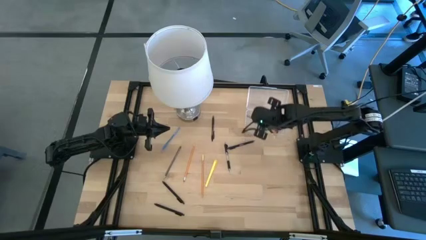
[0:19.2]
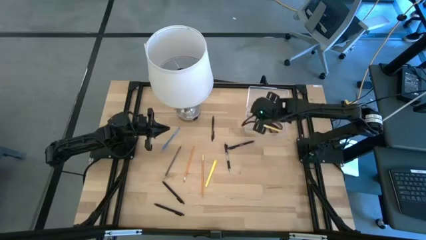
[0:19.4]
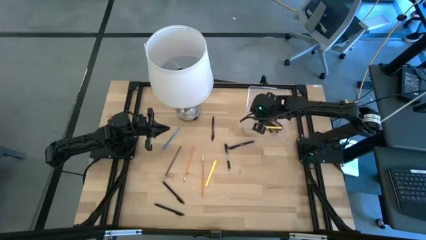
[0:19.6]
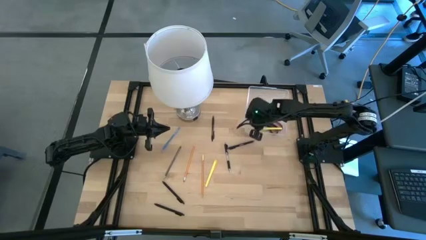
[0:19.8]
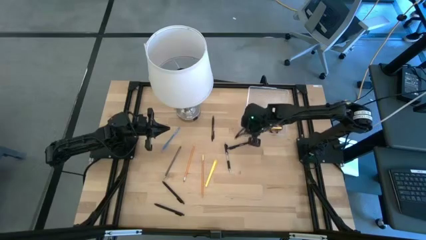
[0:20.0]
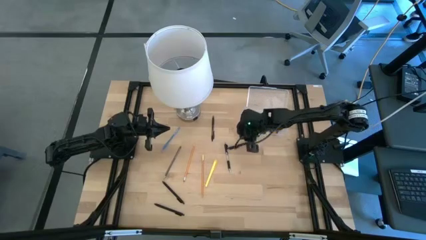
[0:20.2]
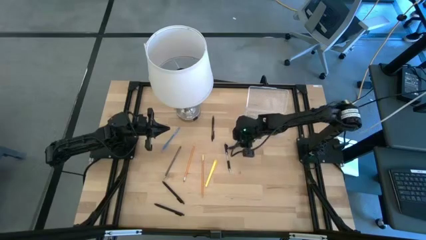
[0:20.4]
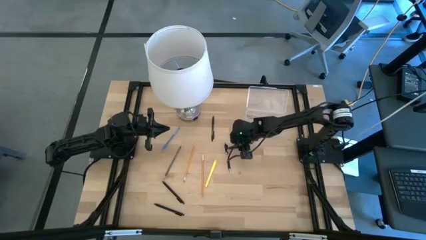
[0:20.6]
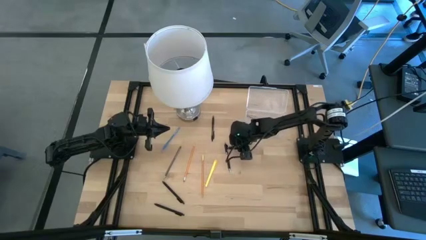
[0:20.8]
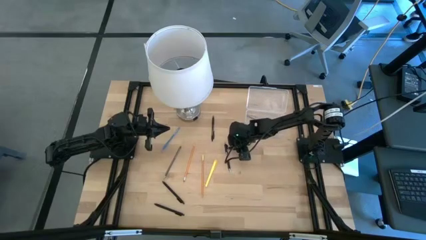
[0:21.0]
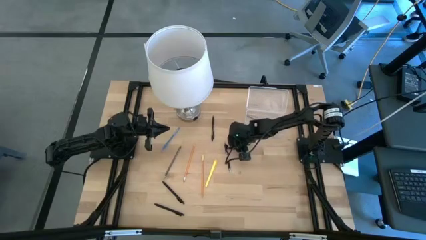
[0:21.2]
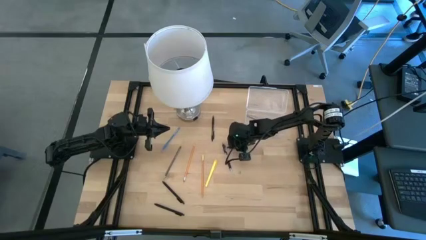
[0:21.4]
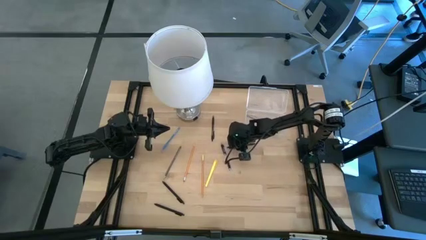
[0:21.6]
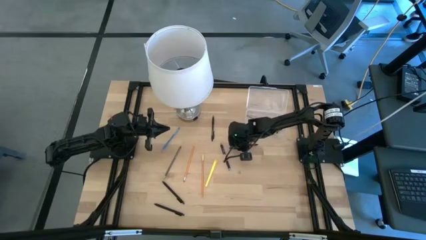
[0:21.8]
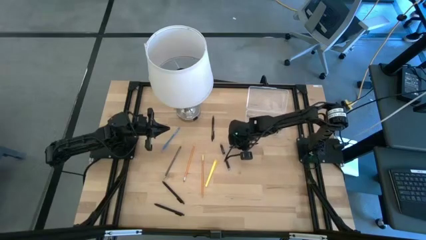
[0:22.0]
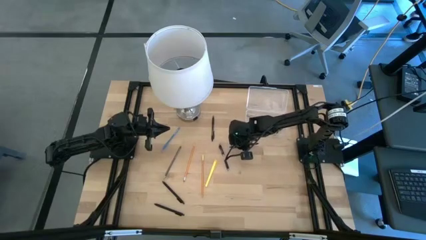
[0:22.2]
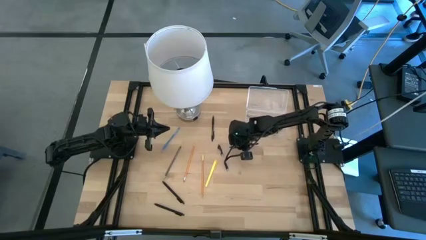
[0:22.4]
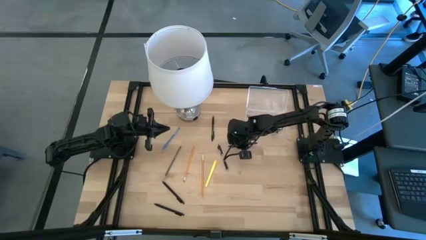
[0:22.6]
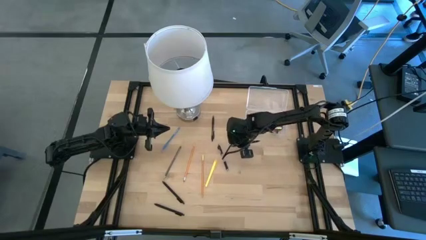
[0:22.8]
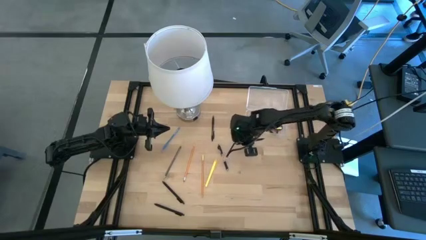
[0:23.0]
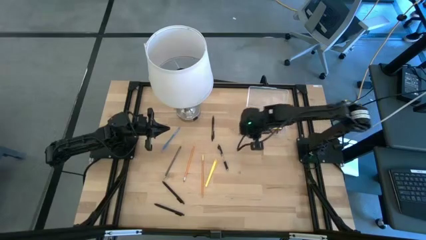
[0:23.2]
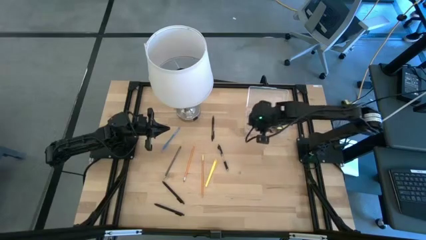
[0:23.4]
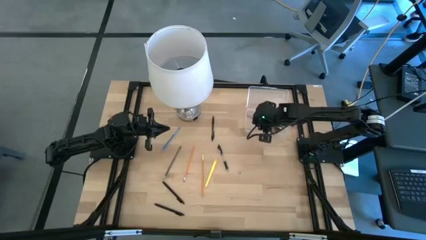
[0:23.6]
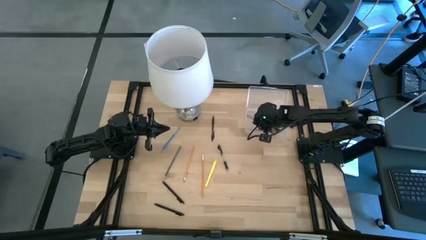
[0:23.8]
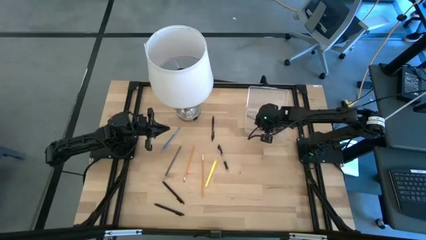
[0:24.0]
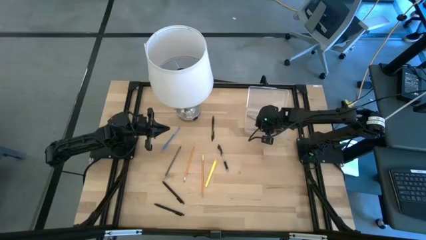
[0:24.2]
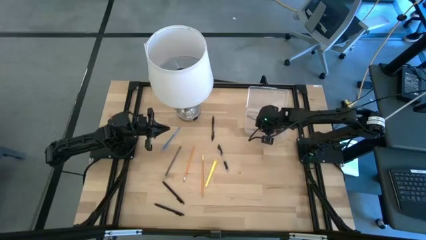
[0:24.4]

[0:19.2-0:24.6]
Task: Pick & place school supplies into a supply box
Put the black pen into the transparent supply box

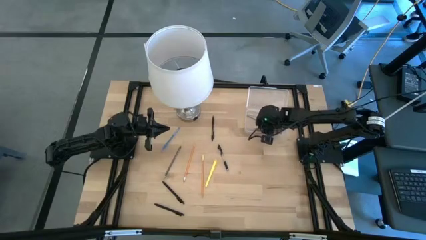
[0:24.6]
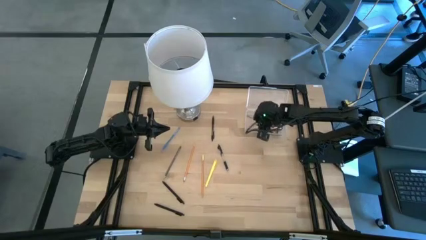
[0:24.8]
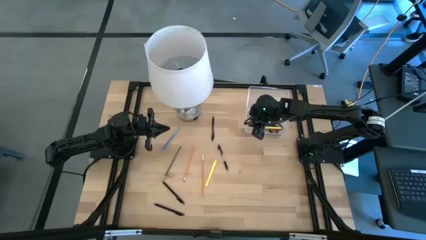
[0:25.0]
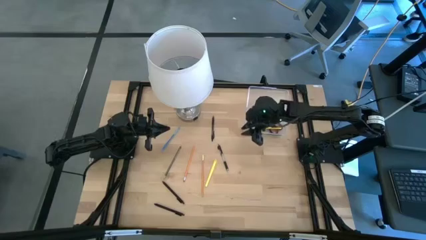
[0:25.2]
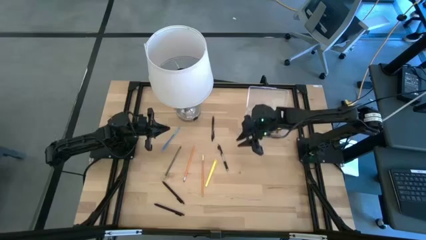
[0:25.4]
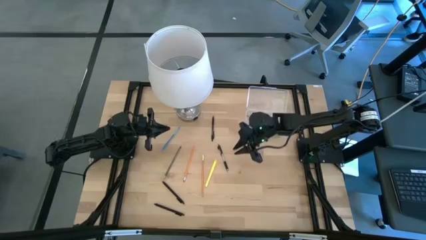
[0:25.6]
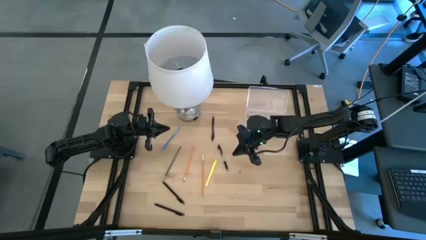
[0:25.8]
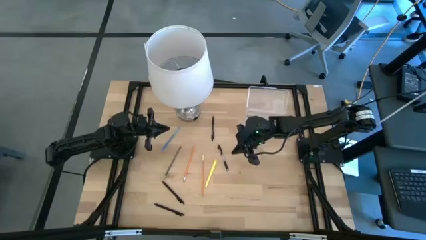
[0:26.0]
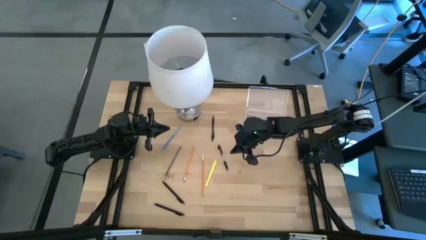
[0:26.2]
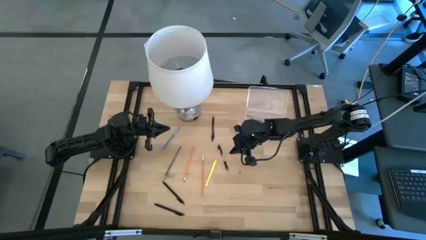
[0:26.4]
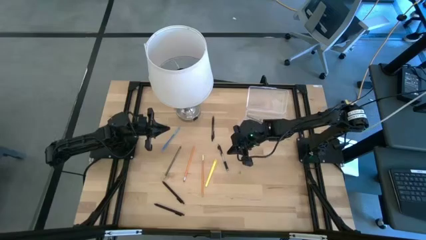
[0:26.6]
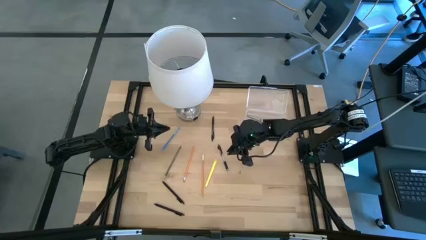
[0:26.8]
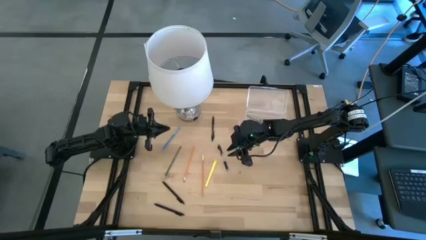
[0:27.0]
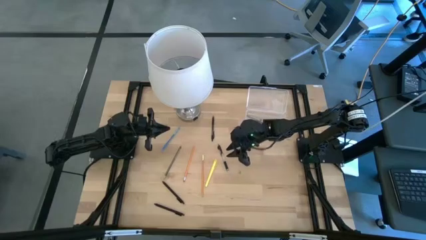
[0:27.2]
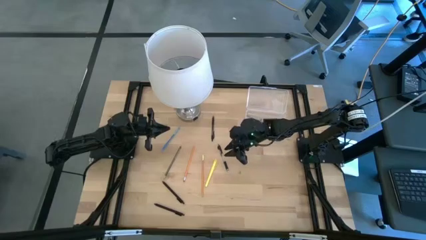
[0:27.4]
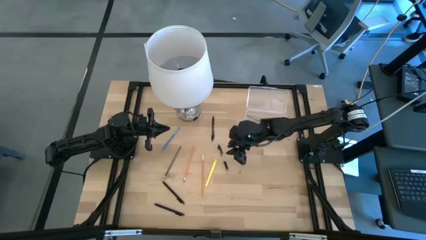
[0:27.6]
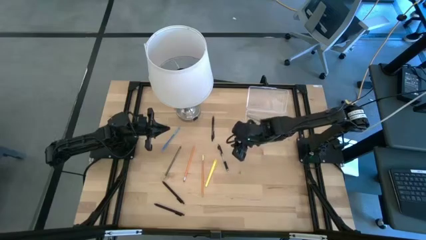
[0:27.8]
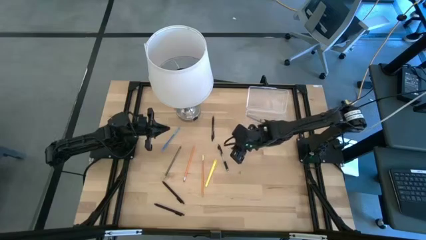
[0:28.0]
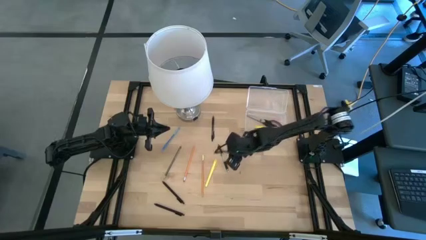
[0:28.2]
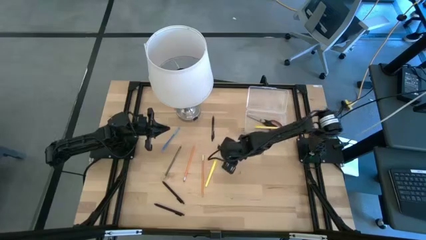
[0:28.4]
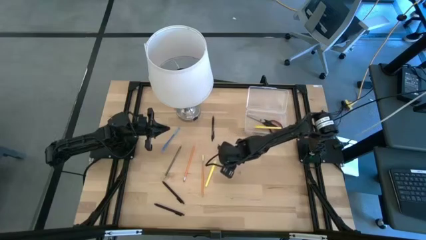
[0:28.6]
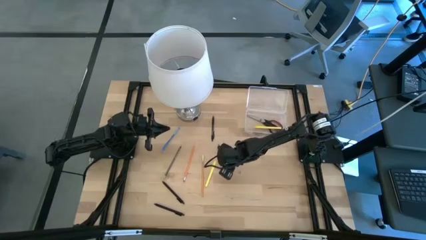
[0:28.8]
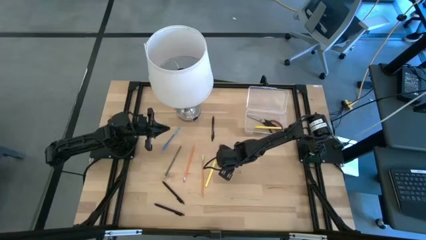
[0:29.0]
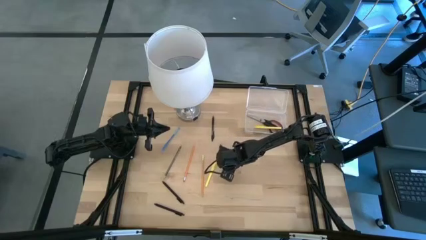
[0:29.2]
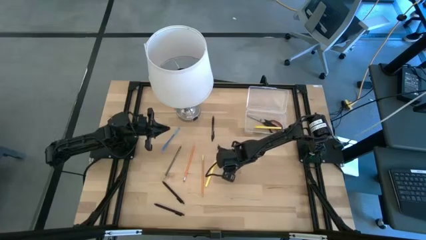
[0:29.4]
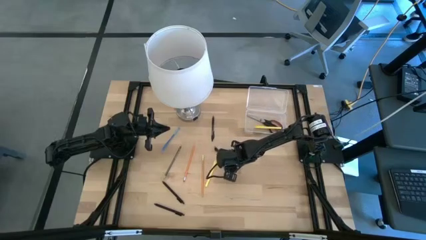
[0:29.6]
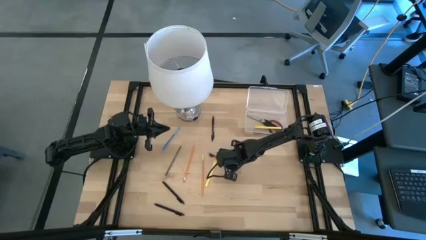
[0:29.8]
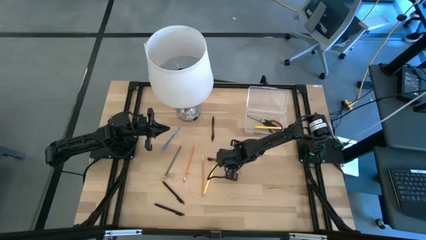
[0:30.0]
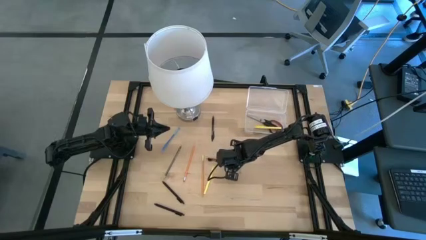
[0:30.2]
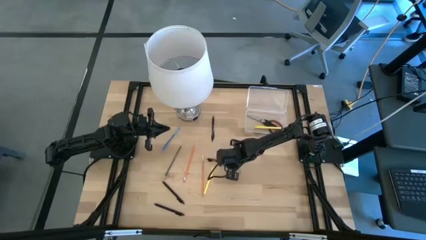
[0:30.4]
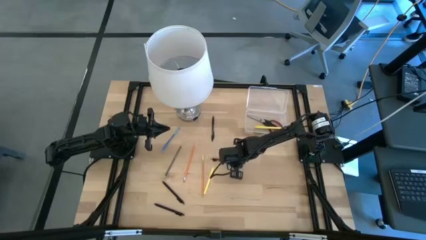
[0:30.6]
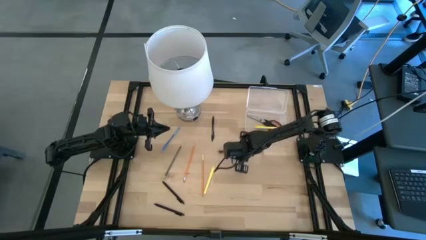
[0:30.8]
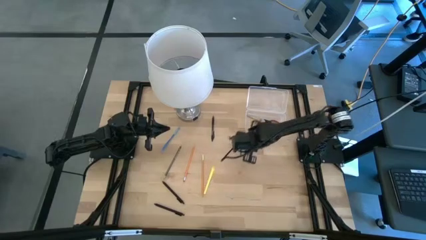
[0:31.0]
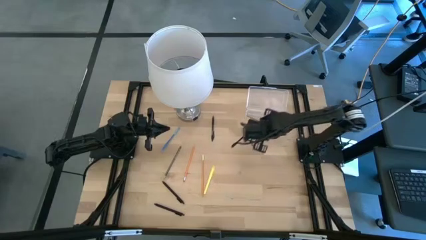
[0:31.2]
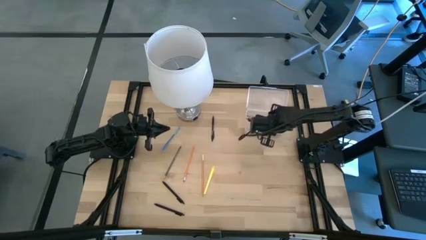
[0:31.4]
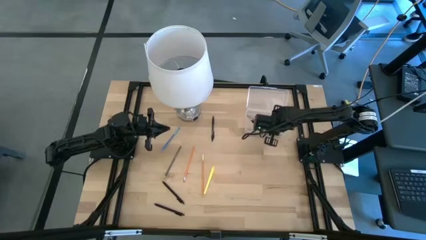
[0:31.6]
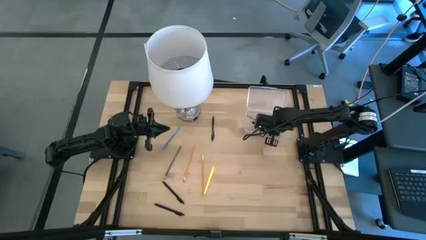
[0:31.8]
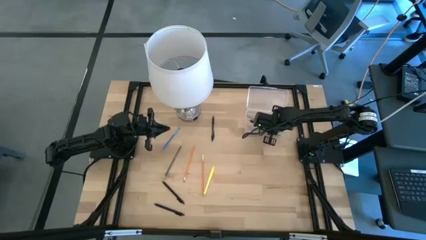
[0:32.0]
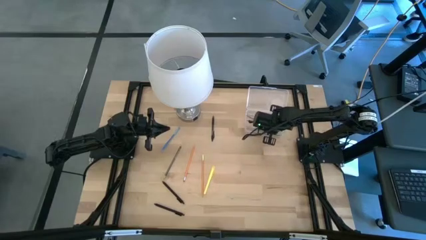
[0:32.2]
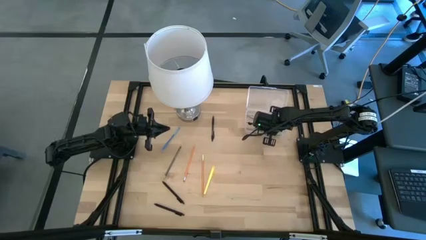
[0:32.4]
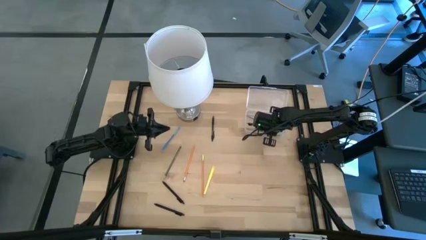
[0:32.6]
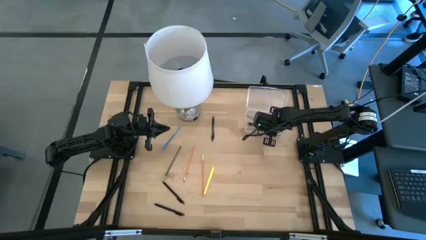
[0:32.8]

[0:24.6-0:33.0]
Put the black pen into the transparent supply box

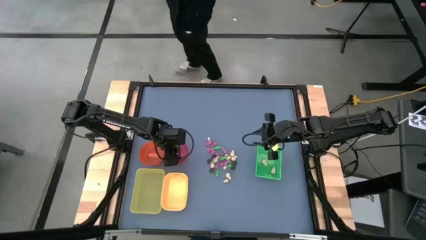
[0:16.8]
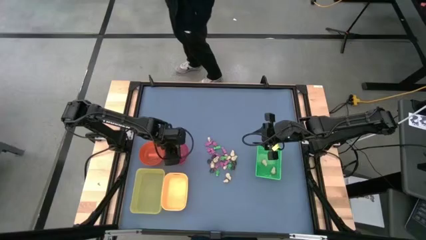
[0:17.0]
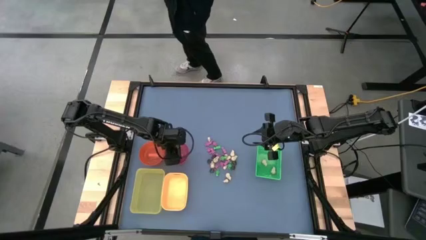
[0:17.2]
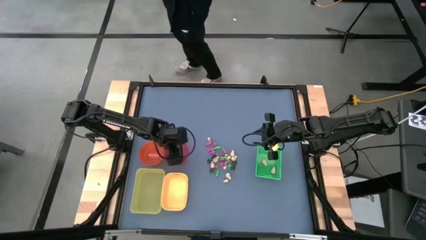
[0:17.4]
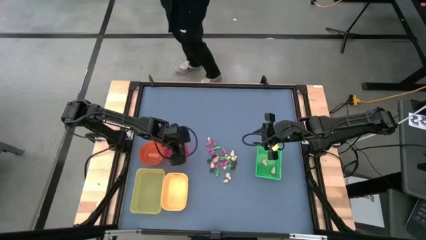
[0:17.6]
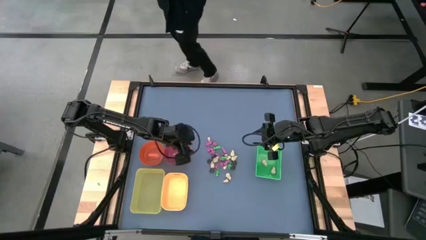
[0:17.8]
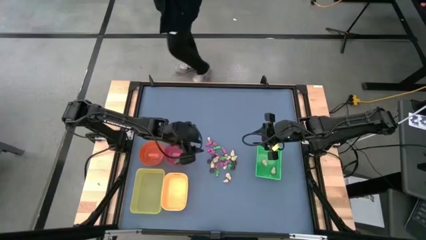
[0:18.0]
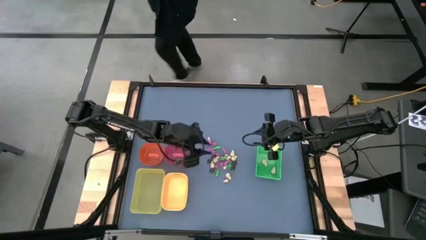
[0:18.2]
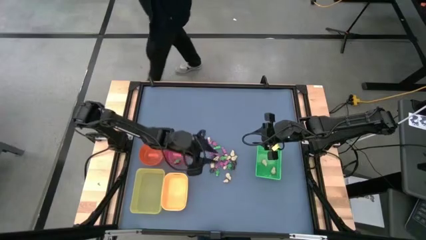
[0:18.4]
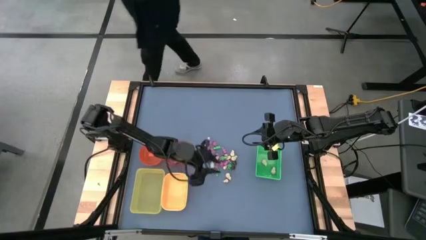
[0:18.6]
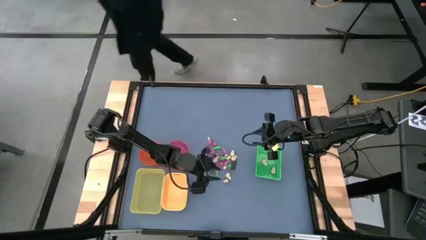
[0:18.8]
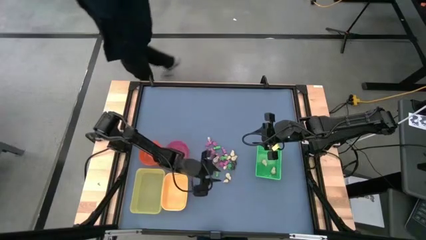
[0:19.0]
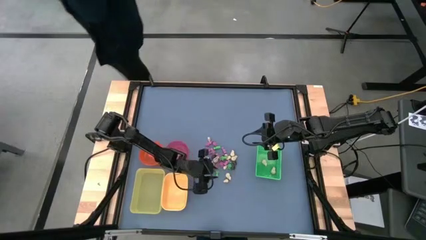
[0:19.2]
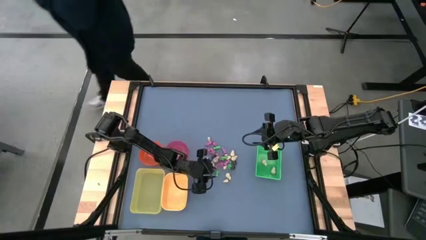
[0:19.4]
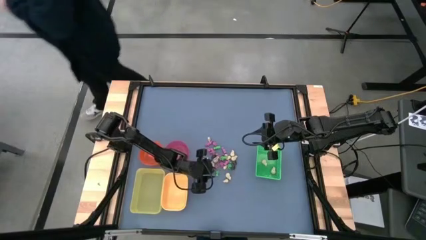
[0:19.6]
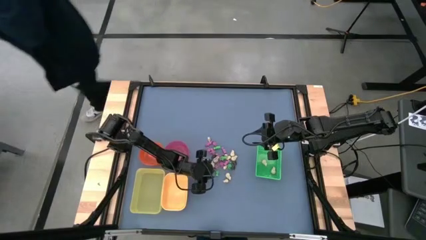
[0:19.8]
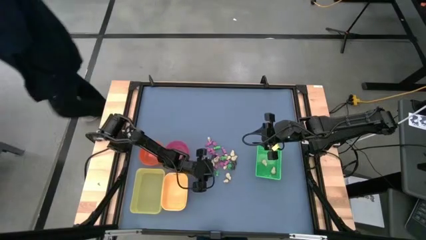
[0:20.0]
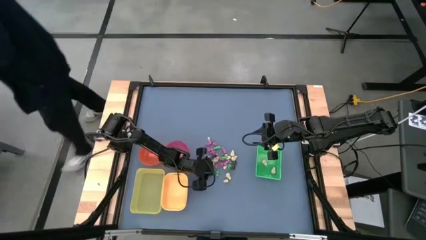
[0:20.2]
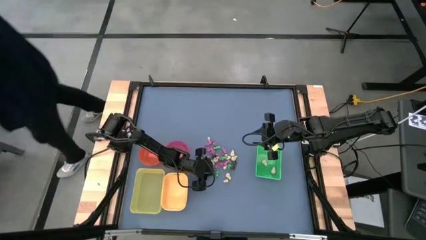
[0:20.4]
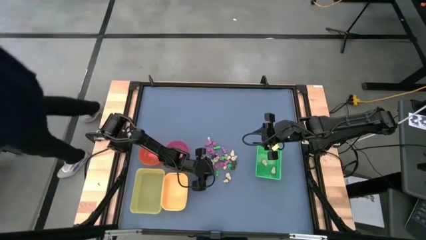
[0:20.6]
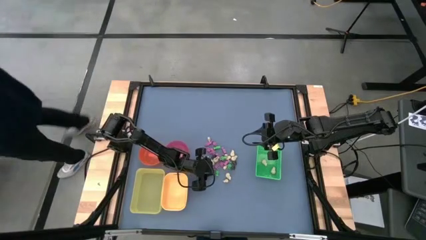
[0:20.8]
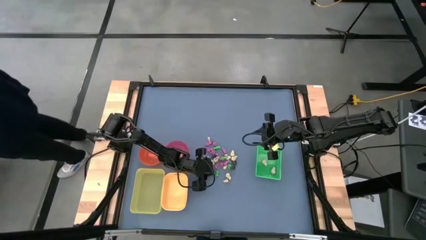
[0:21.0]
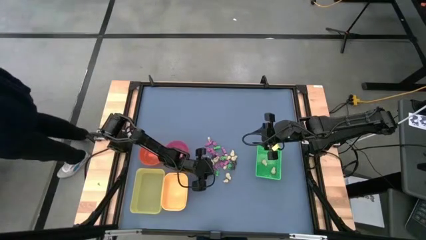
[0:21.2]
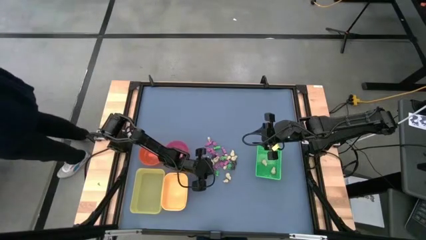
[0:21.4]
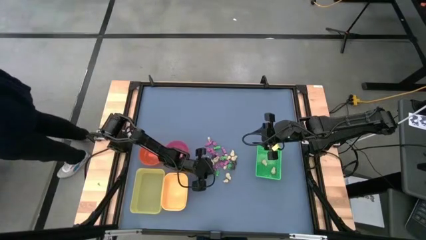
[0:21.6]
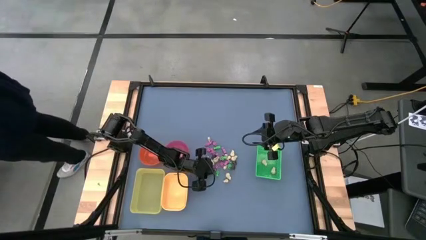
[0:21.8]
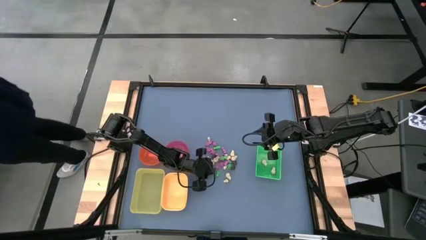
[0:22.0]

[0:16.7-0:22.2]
Task: Sort Halloween decoration
Put the black skull toy into the yellow bin
